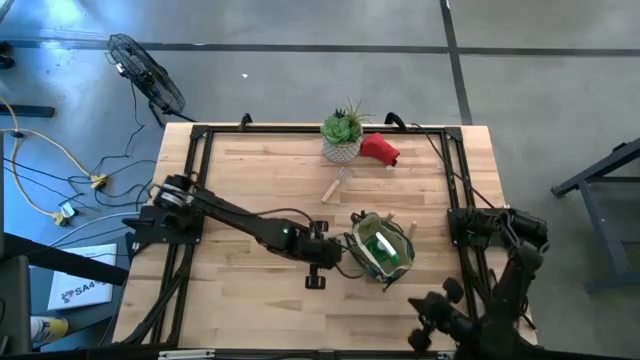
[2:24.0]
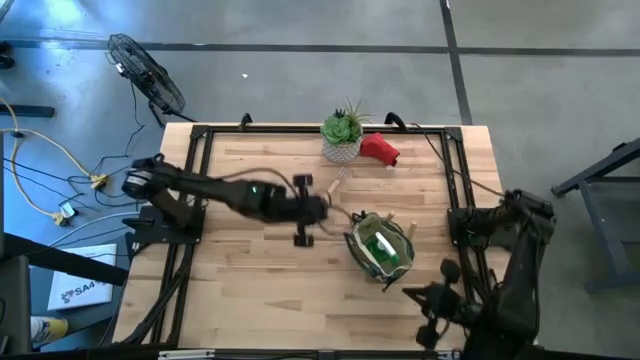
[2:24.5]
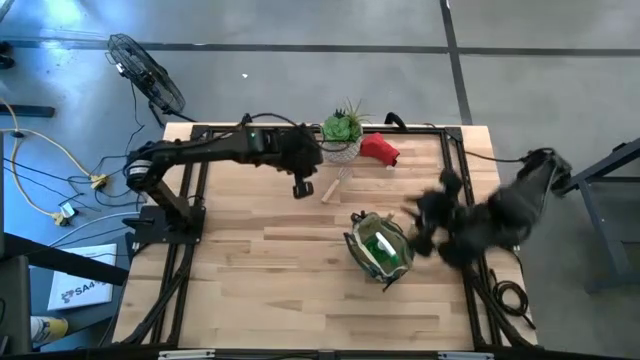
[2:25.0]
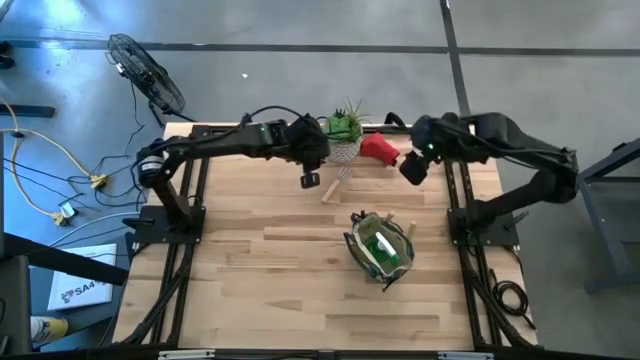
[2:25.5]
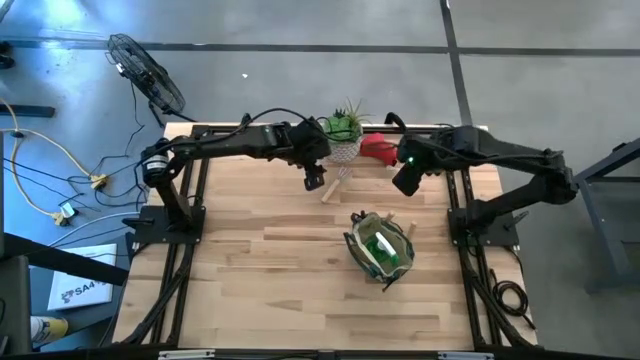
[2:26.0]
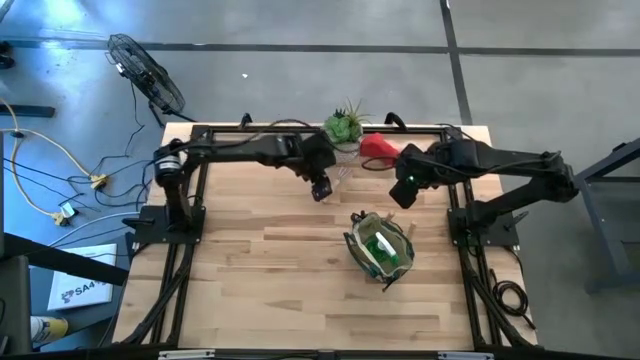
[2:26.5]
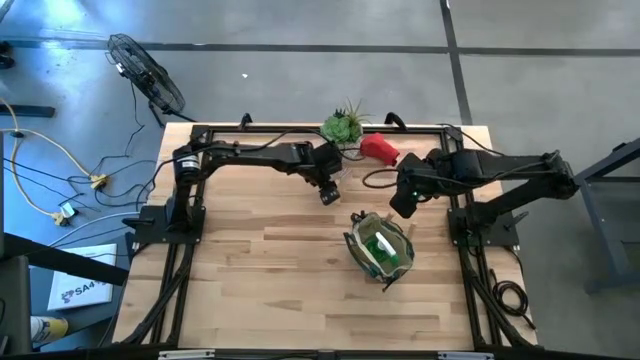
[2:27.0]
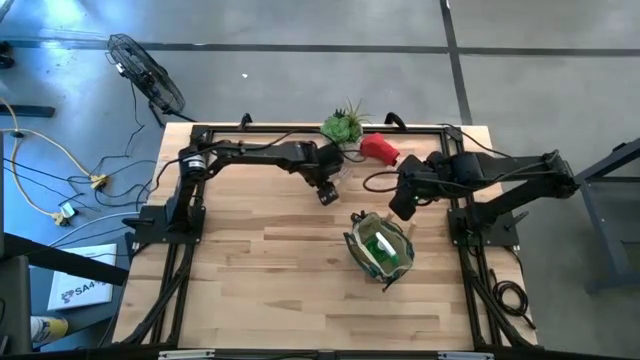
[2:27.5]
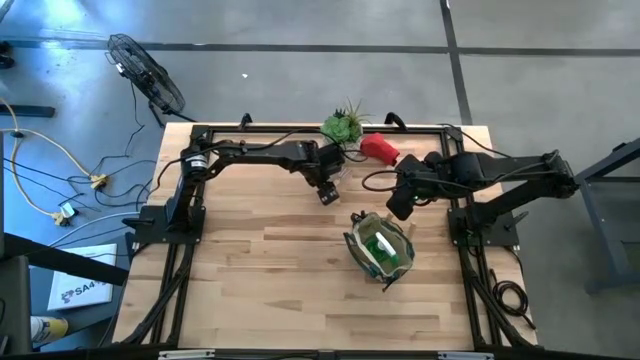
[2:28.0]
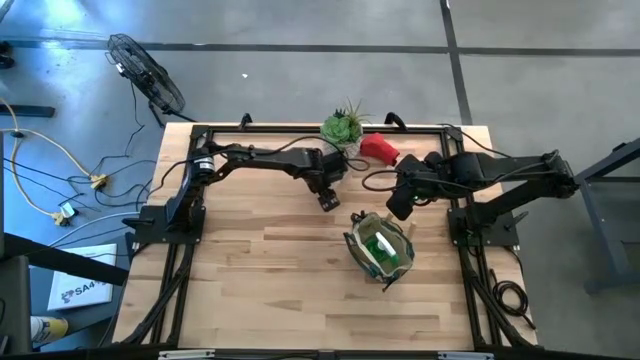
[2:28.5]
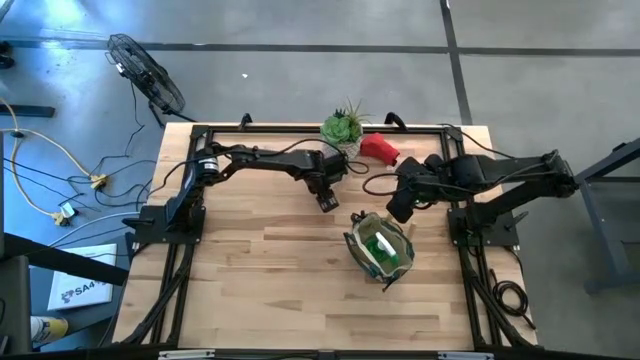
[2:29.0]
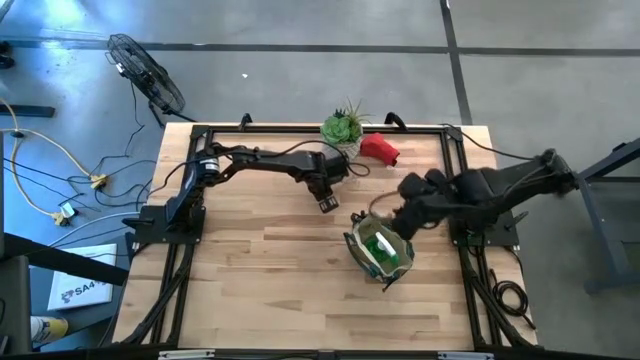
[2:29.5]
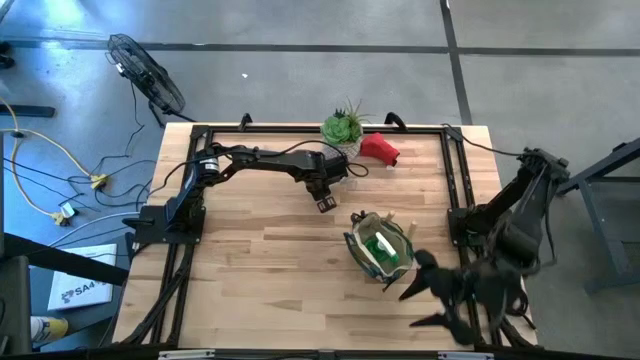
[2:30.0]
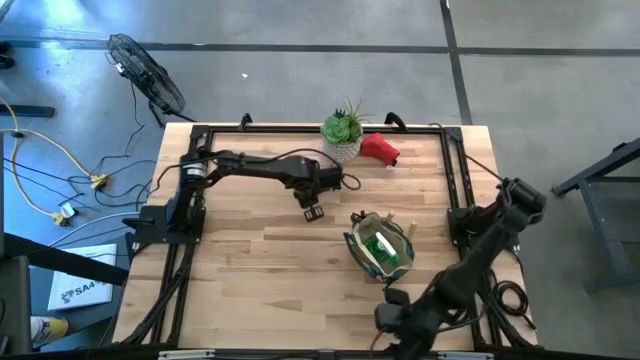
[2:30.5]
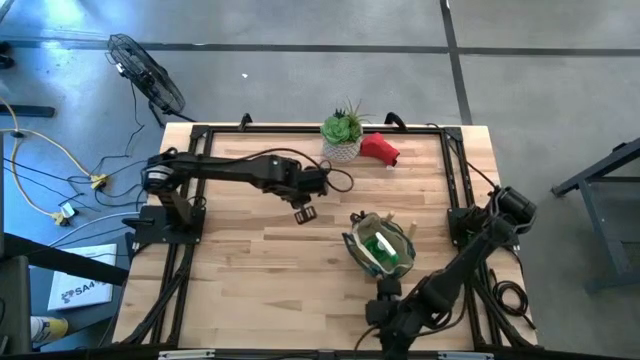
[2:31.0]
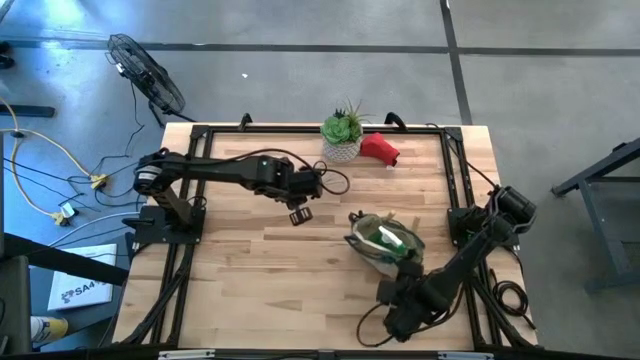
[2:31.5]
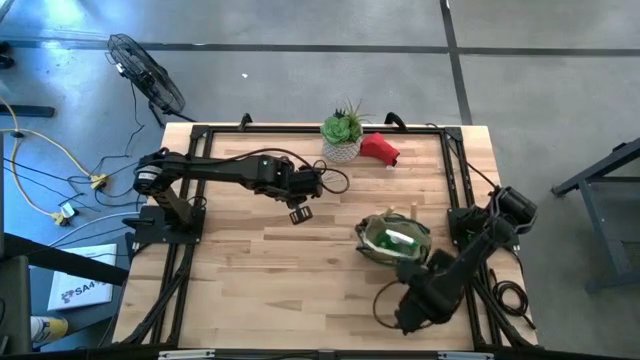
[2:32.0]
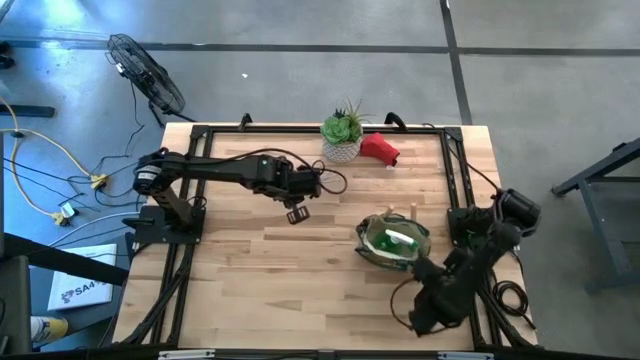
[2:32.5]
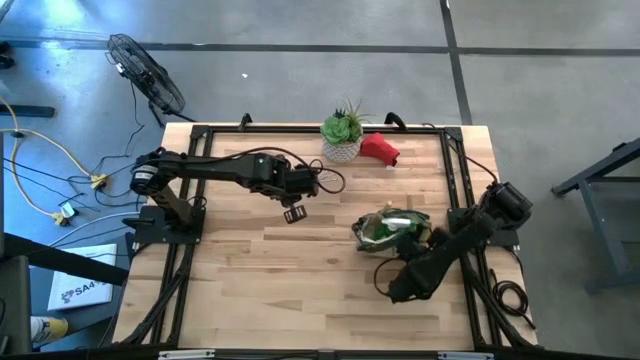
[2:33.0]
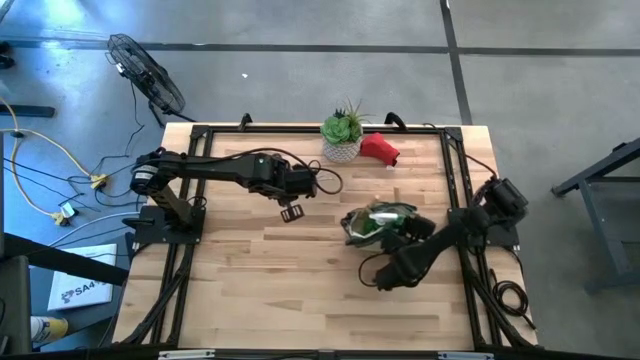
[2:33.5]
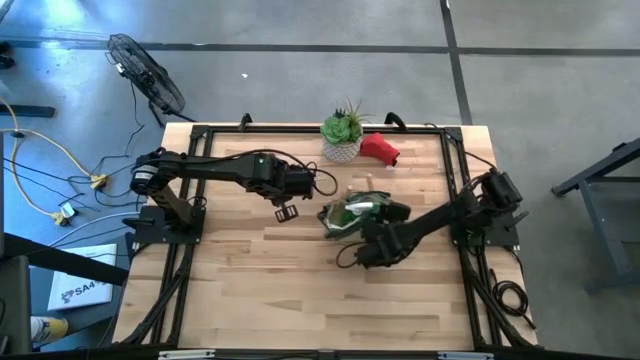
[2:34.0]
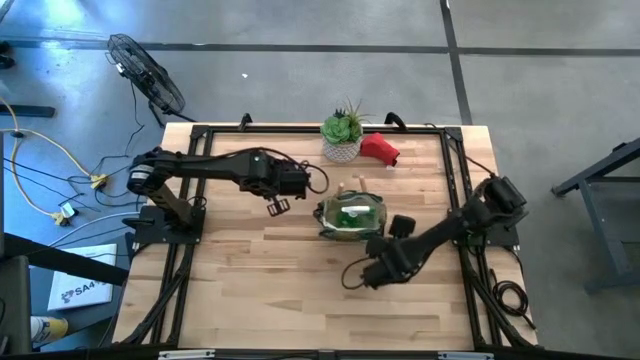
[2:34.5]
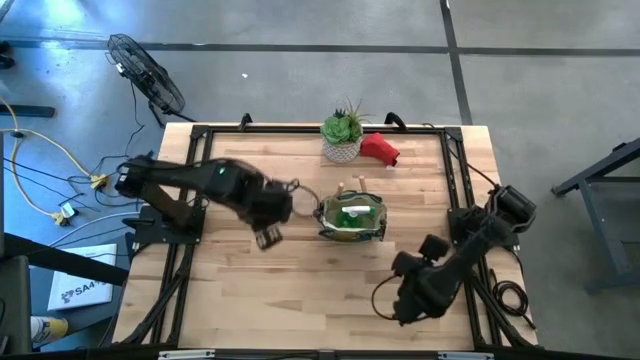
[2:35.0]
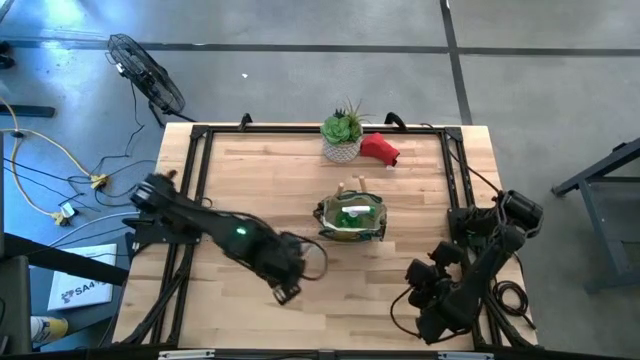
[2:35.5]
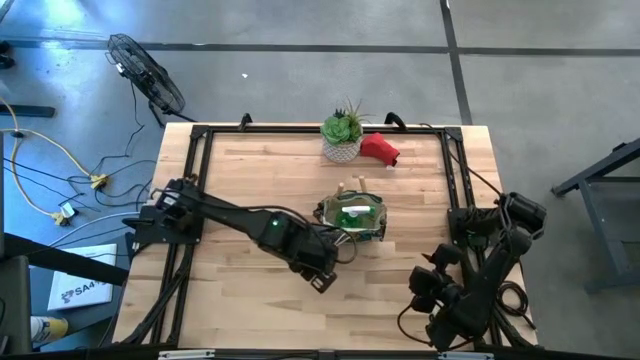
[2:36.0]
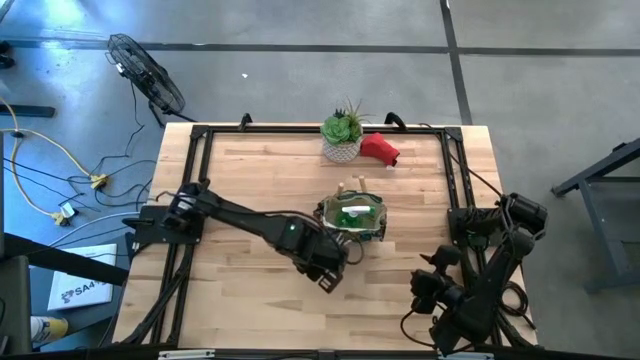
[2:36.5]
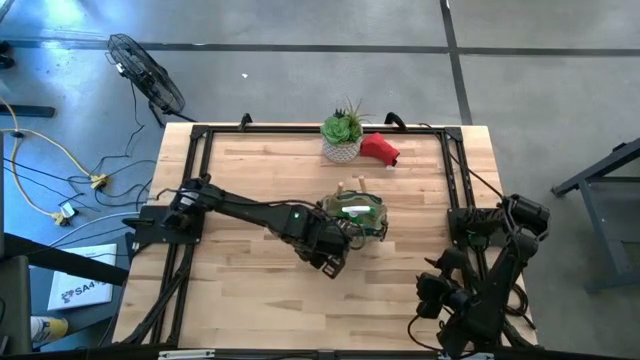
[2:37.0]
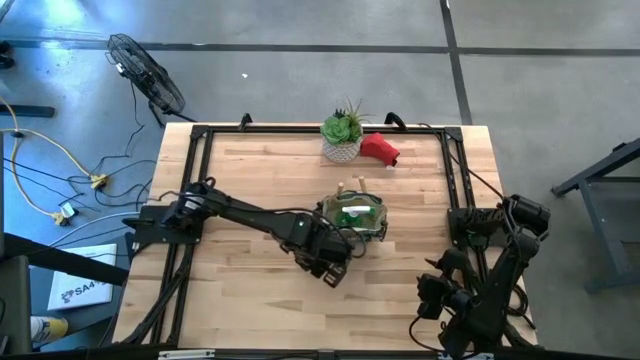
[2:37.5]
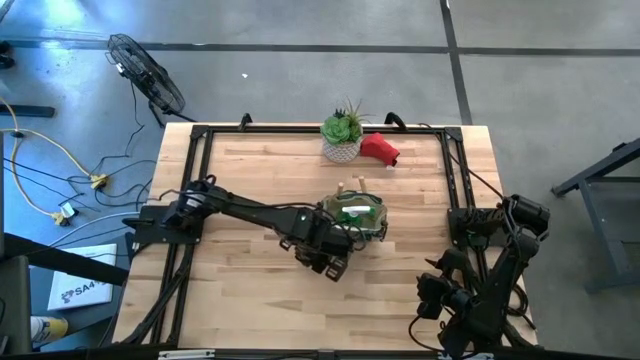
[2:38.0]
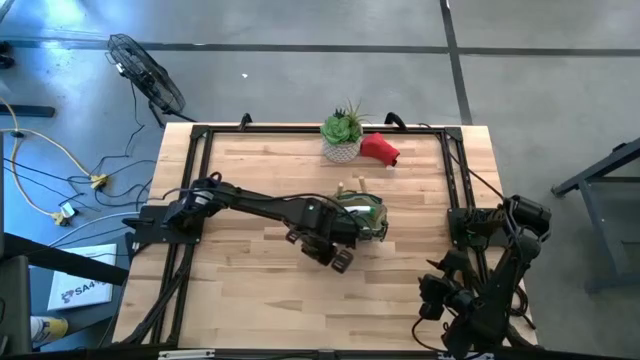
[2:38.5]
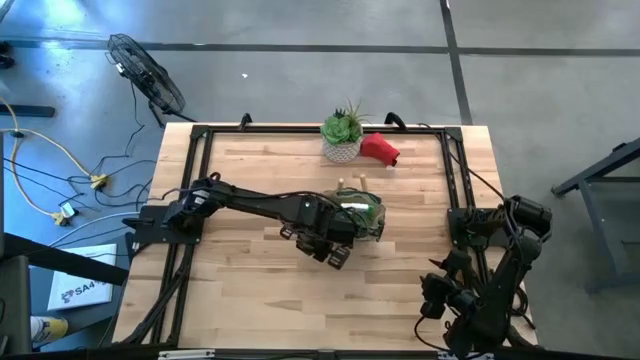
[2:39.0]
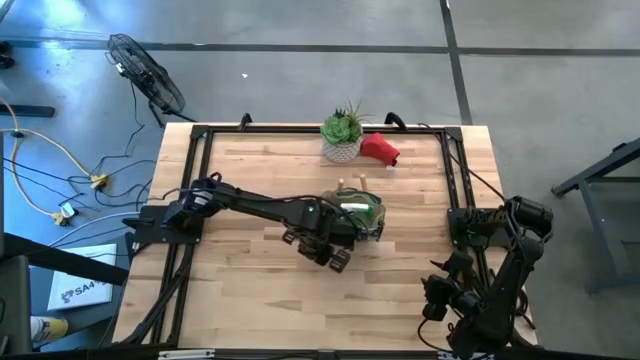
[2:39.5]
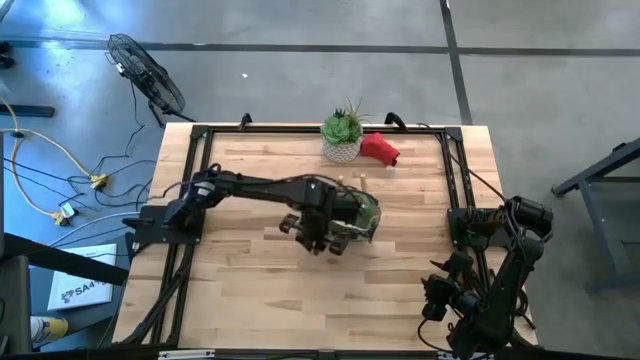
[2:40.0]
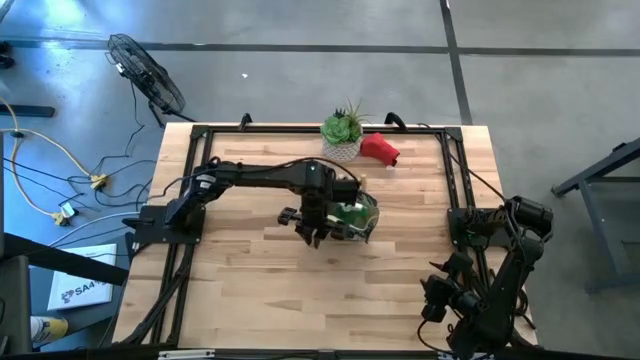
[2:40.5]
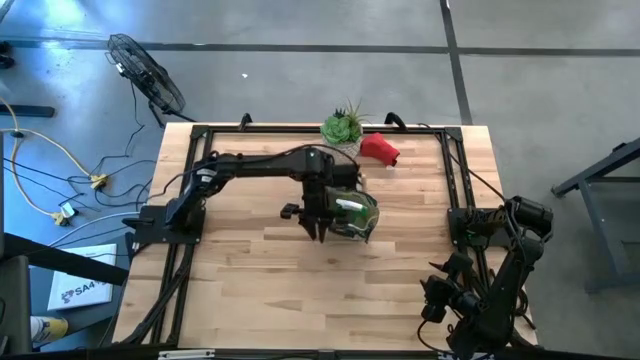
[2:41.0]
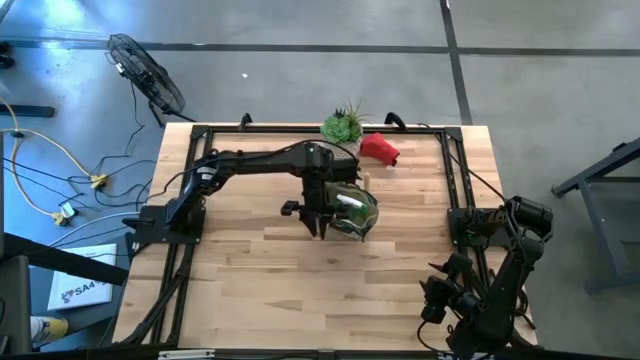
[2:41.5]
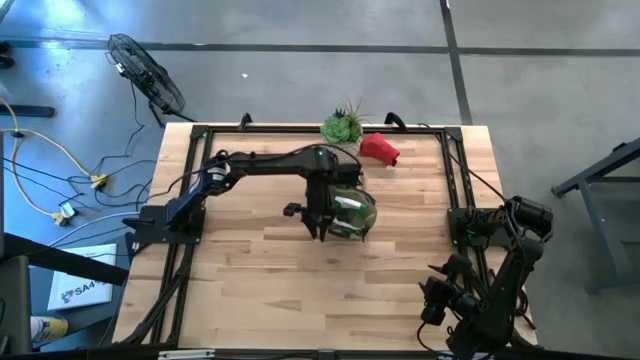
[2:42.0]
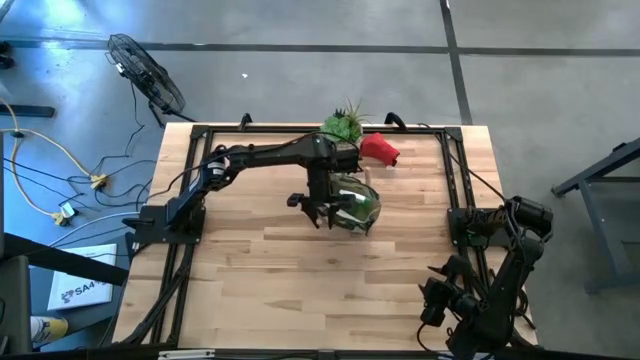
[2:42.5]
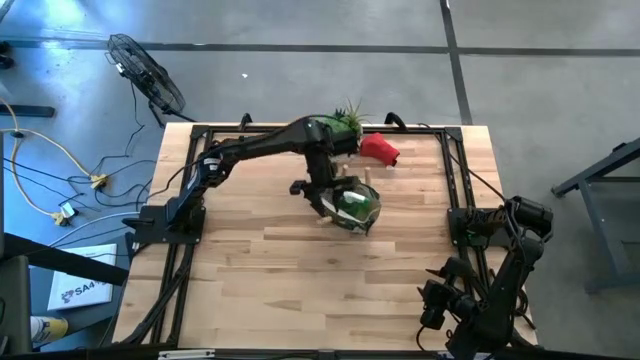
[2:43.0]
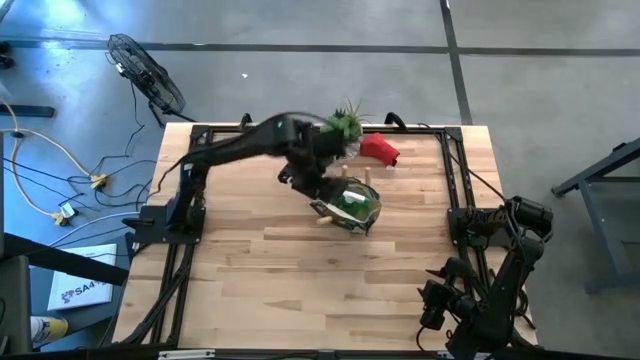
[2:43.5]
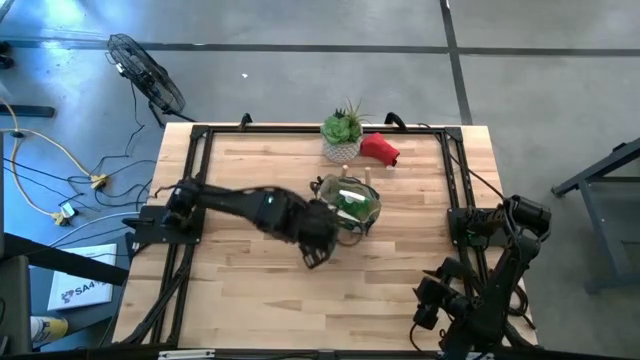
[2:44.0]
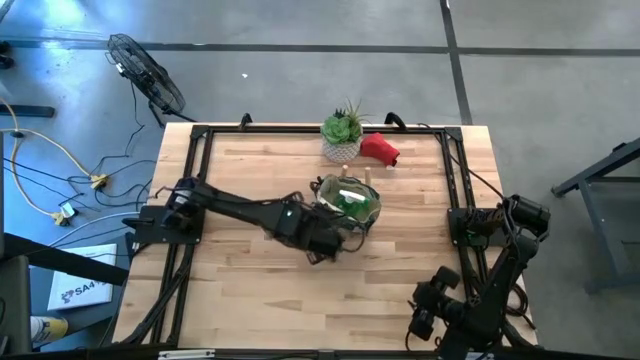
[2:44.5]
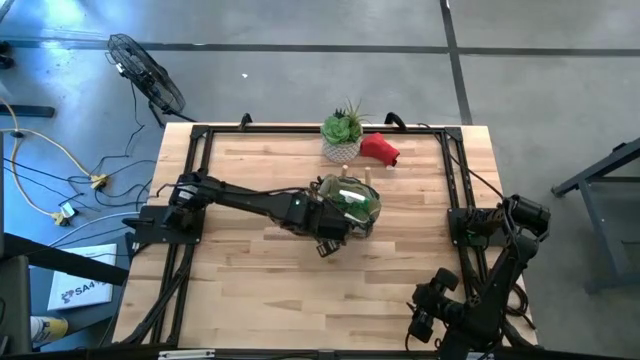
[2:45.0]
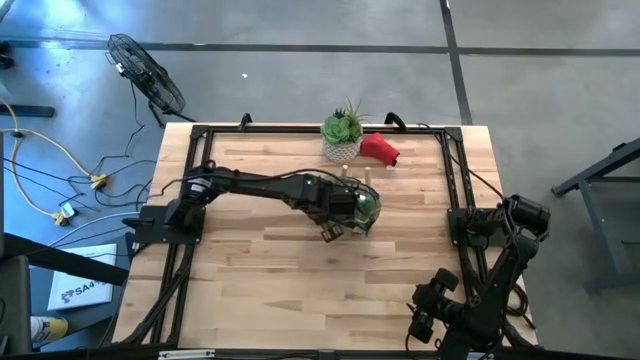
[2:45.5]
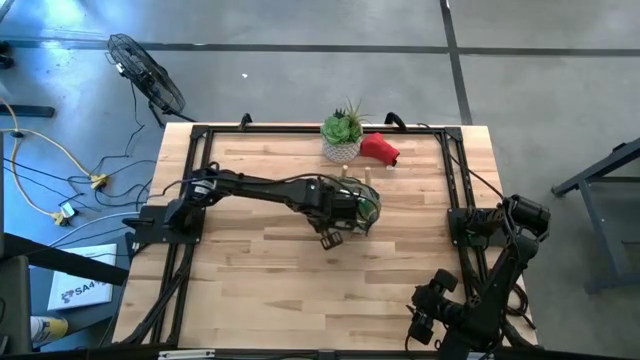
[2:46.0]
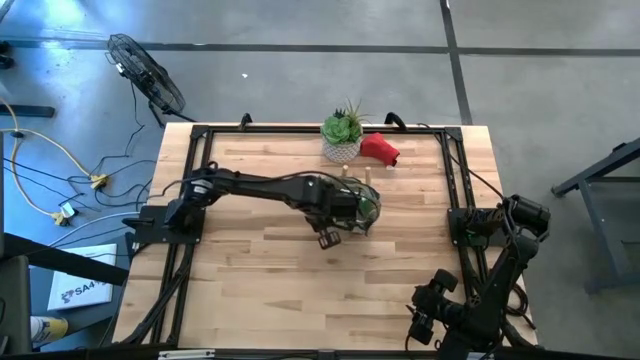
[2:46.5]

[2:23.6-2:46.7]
Task: Pick & Place Garden tools in Gardening bag
Put the brown hand rake into the gardening bag
